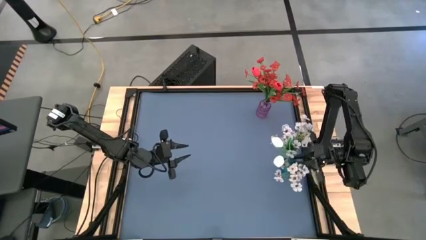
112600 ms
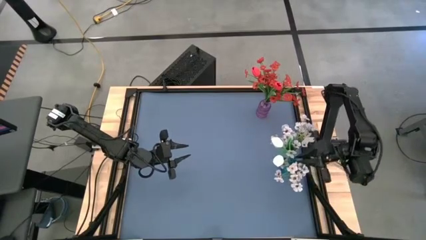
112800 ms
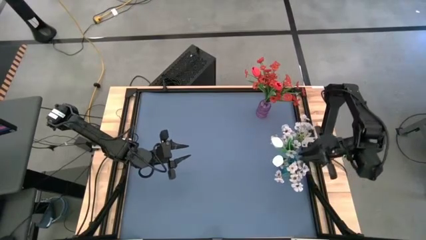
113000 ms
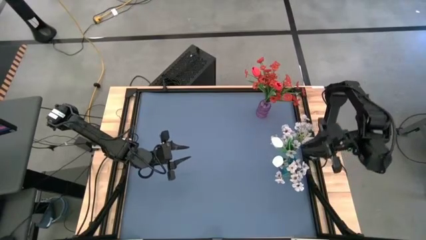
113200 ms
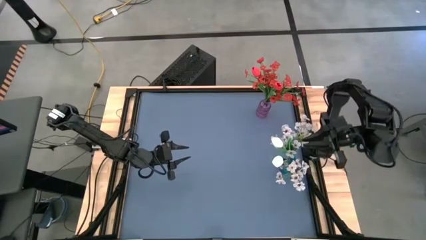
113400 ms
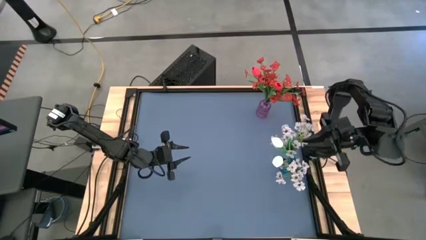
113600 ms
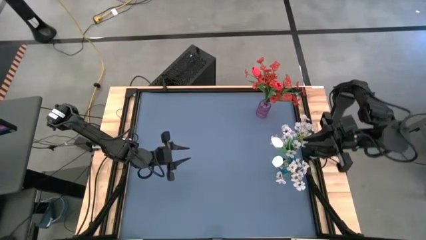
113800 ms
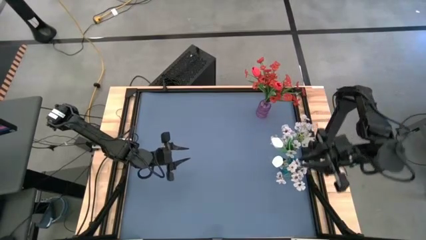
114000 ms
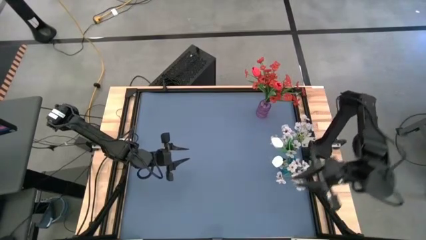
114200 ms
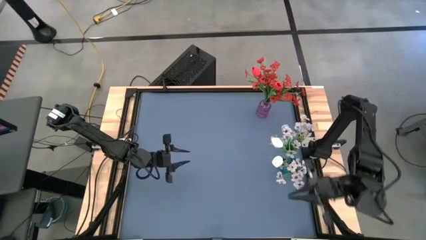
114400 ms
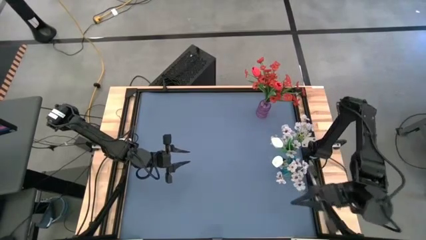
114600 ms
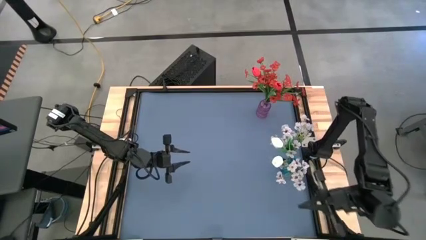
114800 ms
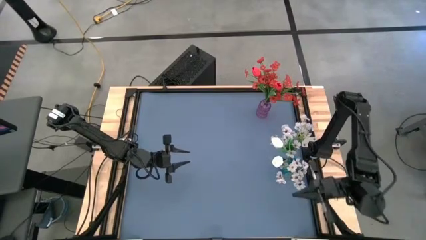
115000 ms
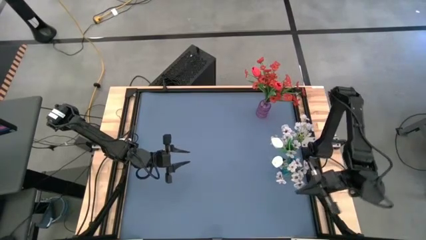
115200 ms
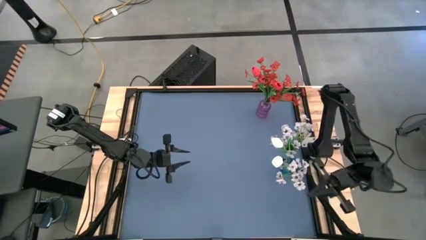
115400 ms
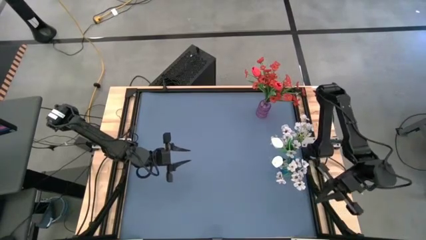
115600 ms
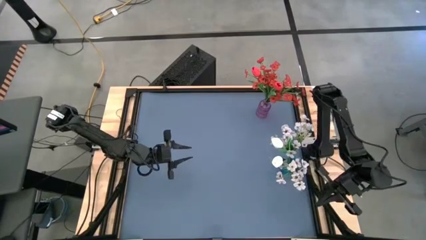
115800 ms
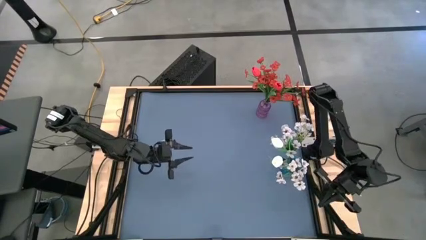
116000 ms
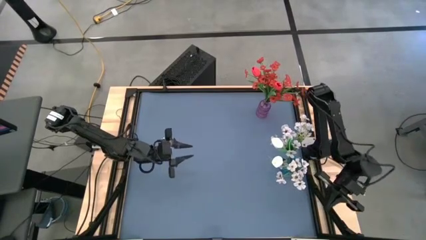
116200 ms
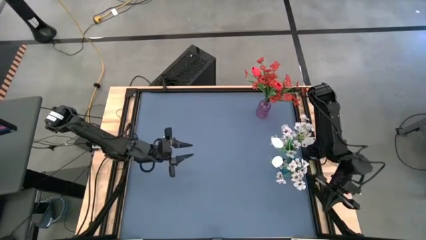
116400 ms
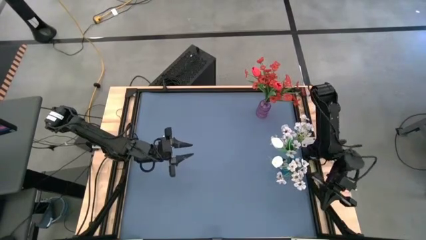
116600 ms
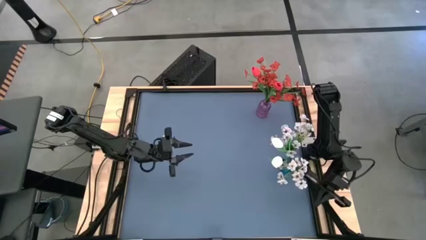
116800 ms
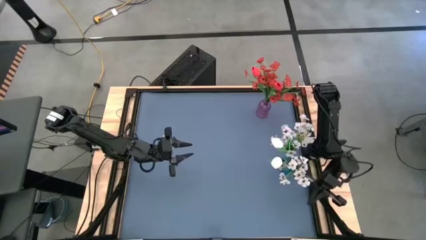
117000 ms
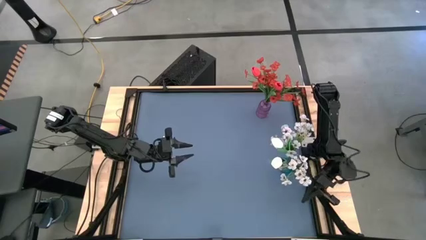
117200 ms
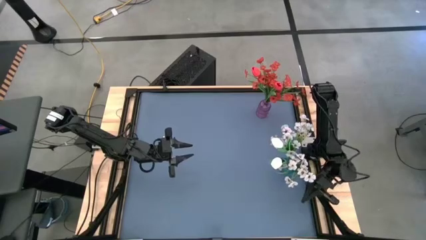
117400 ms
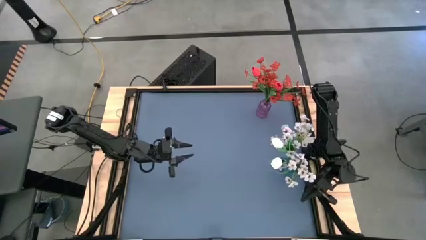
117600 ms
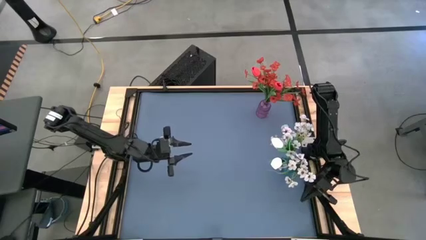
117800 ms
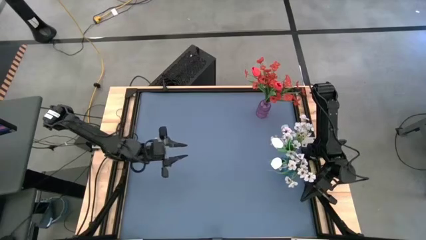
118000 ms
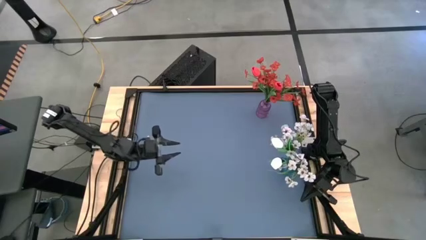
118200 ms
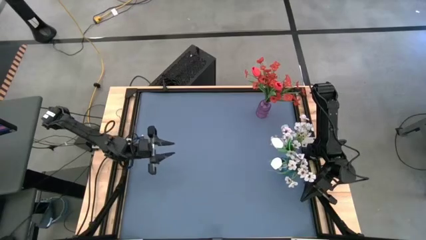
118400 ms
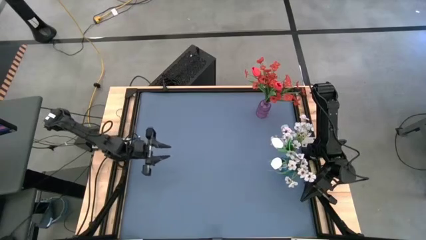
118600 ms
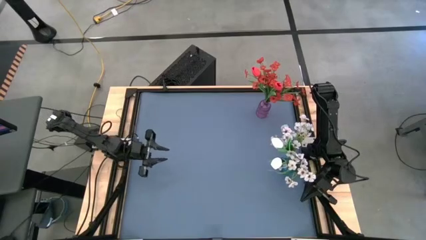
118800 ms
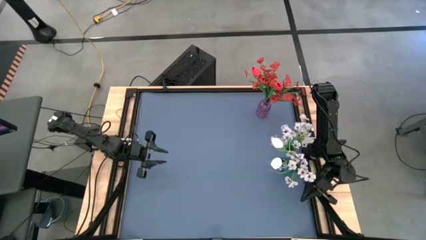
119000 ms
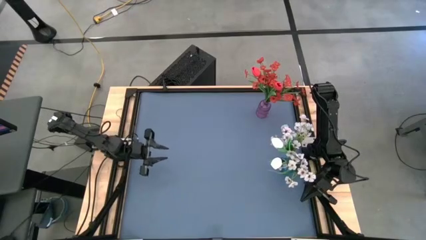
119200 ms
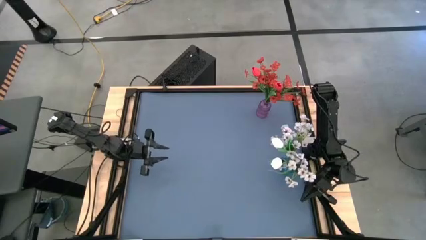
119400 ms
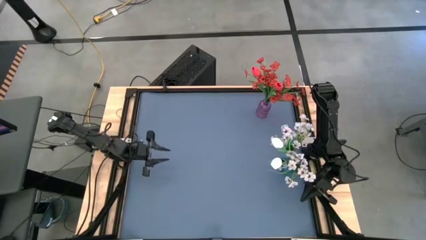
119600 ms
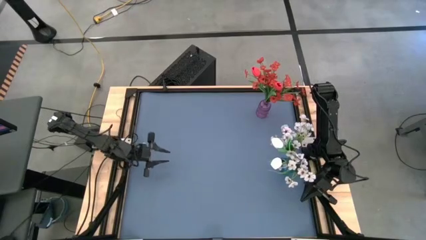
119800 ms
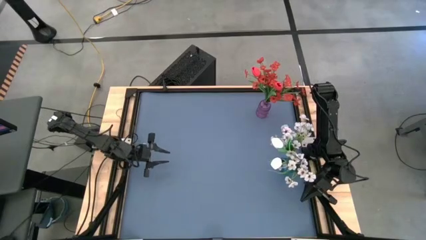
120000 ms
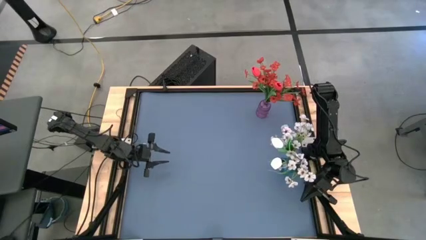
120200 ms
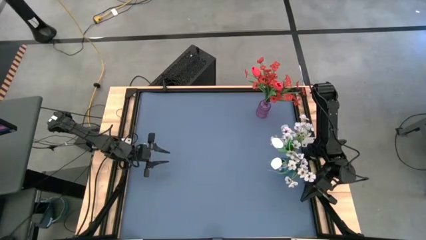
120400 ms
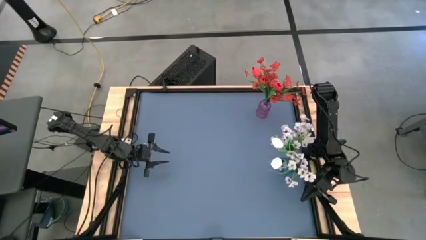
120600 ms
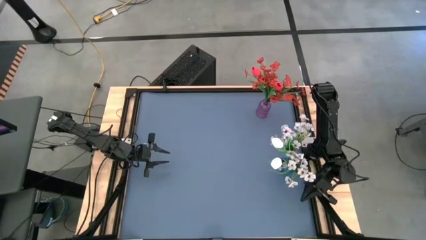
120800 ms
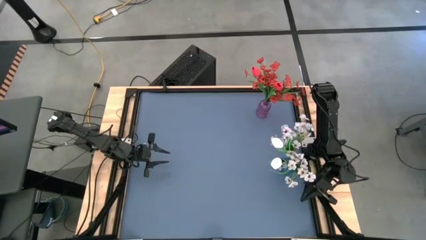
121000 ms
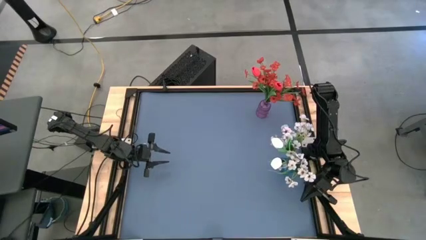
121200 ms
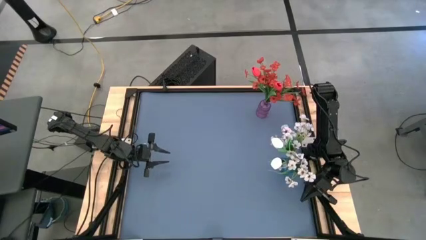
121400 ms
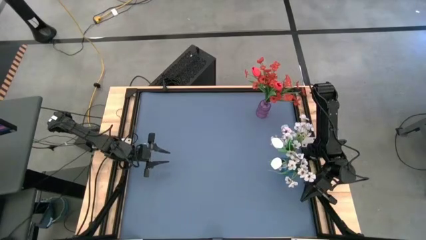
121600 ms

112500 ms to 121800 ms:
Task: Sort flowers into vase by color
Return to Home Position

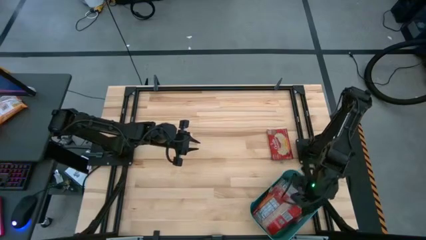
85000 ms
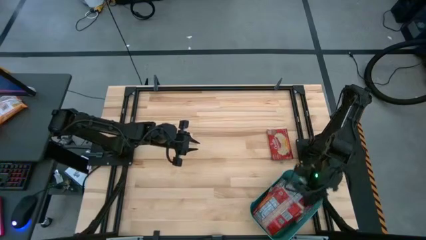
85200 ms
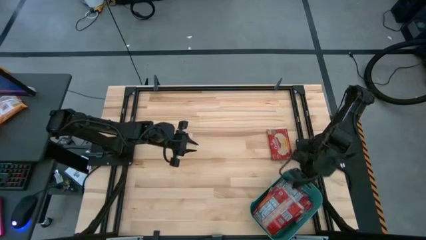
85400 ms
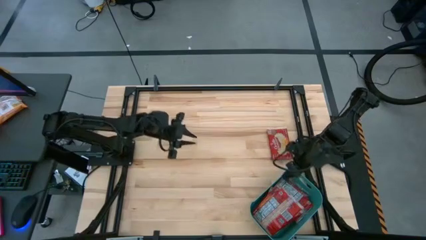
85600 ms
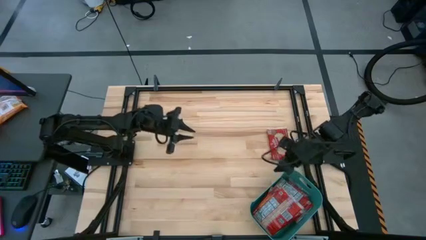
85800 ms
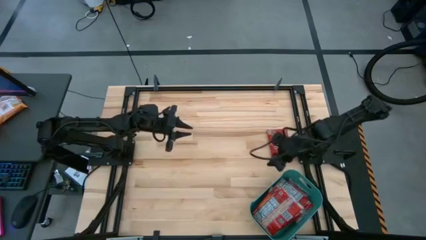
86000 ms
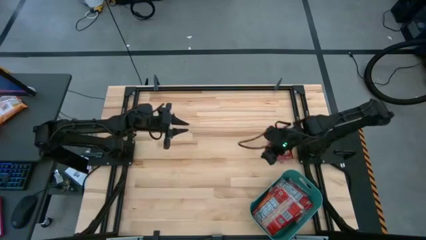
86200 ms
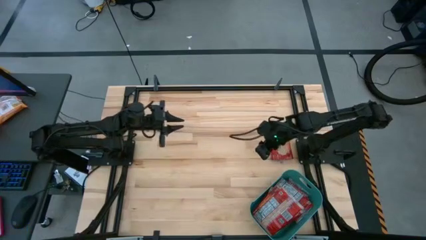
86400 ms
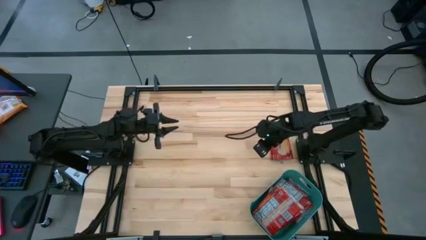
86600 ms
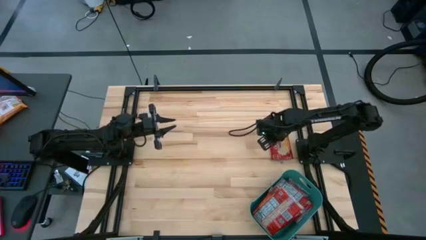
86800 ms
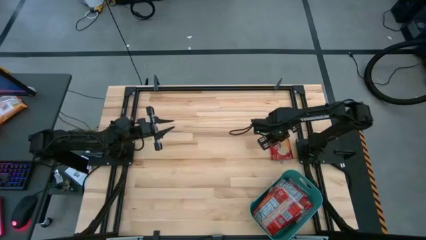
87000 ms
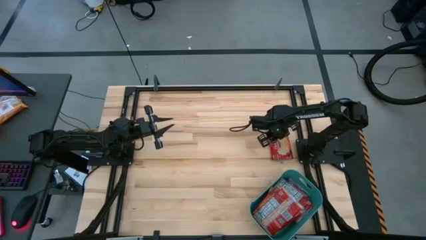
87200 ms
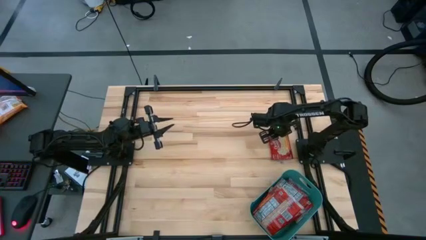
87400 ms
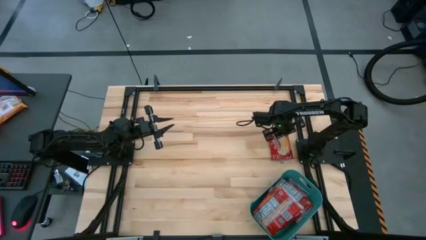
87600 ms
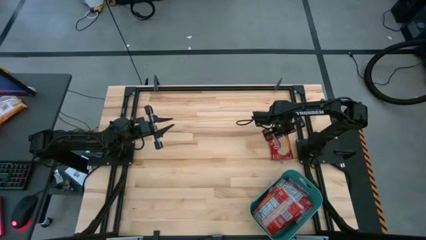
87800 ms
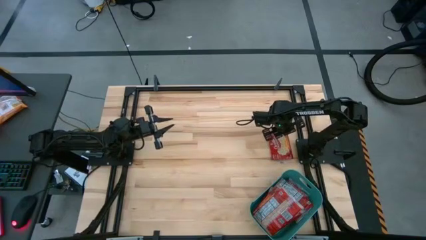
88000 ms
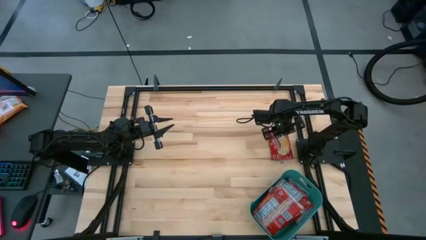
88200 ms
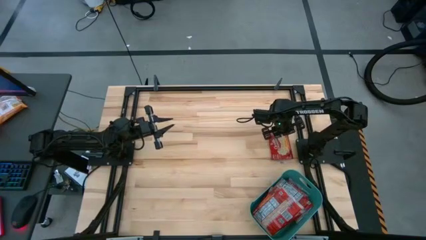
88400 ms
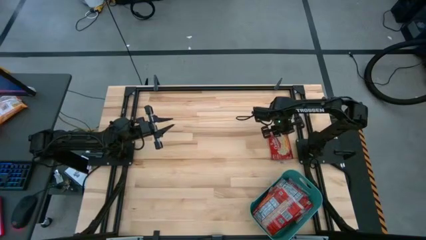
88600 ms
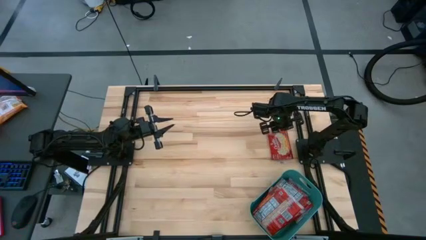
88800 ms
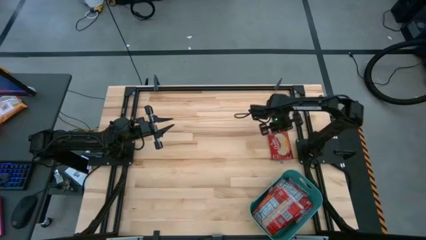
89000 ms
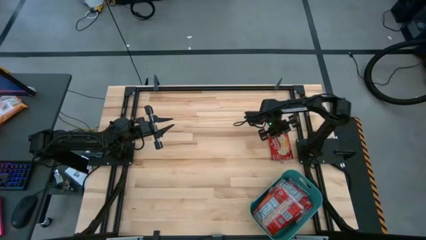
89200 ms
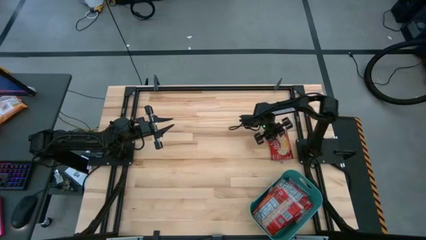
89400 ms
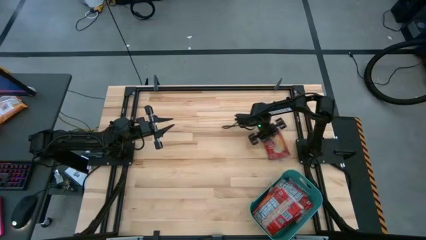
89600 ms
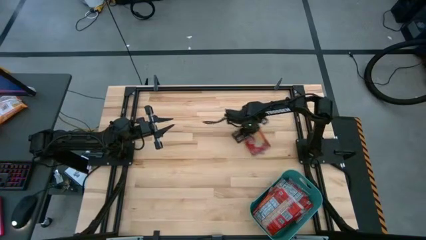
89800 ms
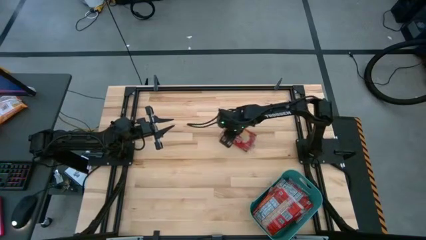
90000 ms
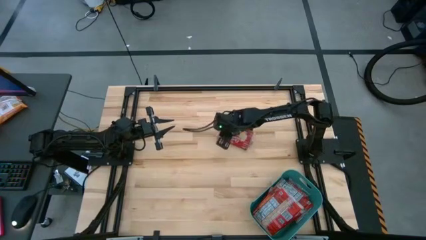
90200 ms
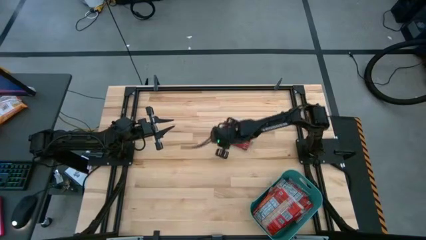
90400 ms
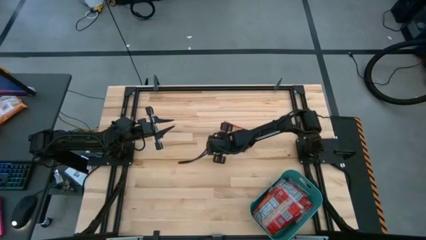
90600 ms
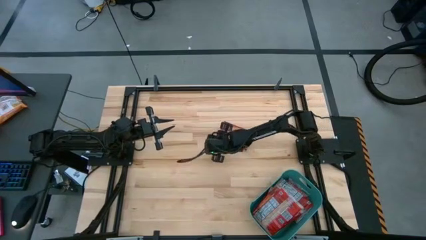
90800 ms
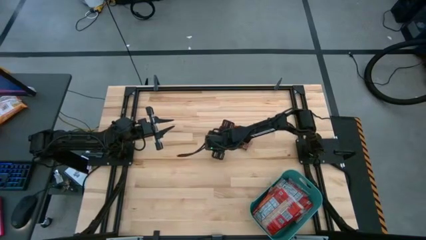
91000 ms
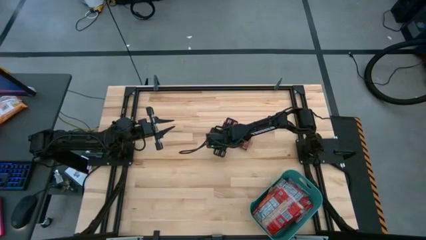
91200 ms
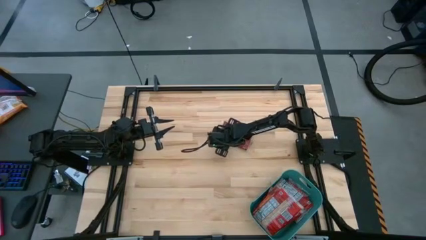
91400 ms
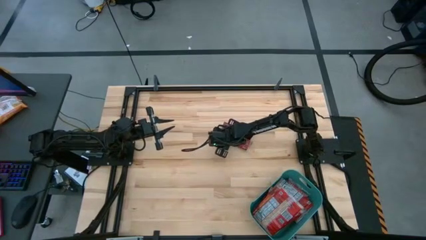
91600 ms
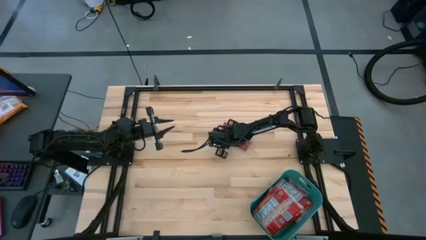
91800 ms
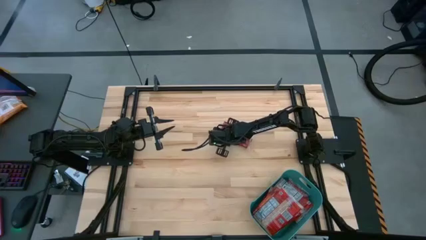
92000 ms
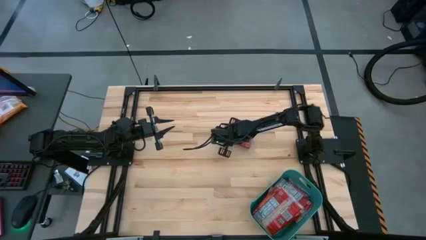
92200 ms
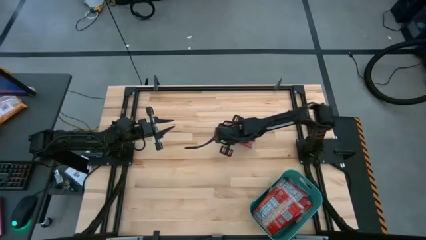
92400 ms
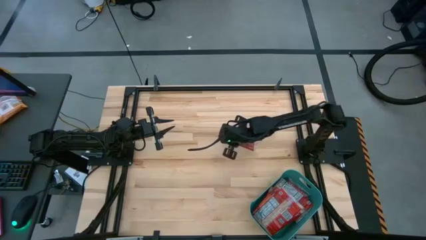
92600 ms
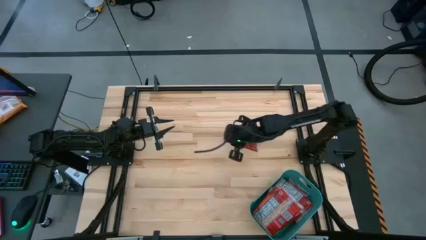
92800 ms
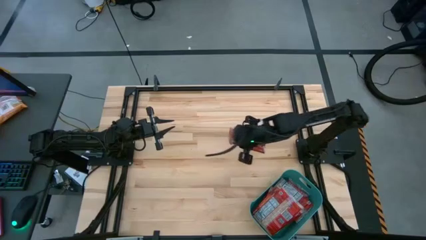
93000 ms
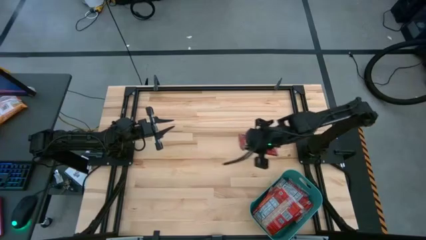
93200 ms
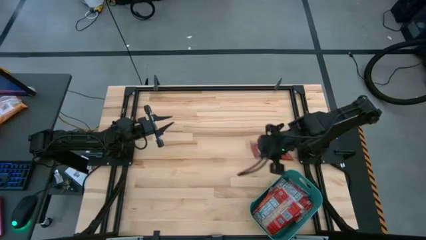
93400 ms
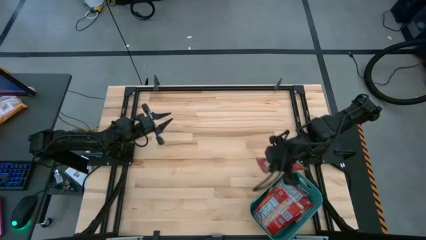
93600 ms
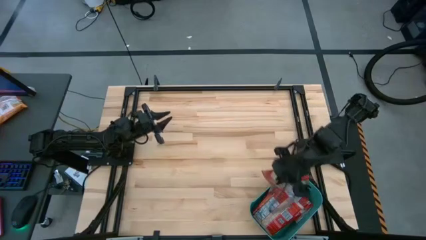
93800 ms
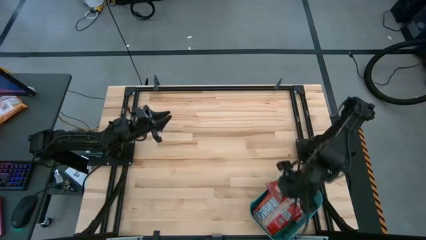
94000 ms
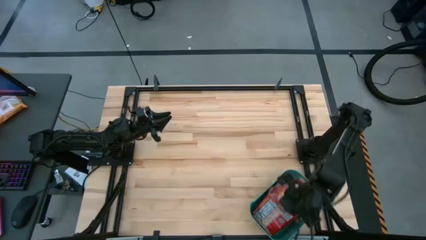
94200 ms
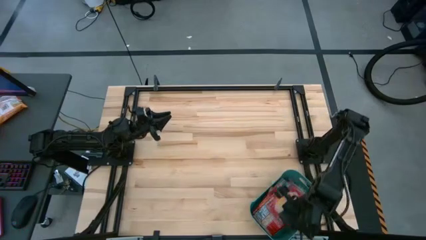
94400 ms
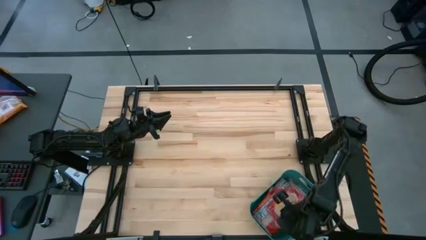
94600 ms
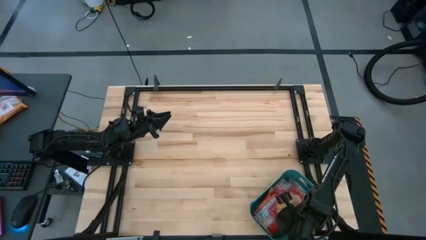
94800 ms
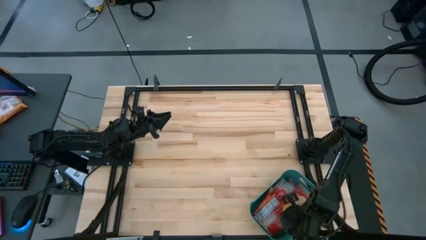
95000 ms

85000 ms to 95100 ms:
Task: Sort popcorn bags into baskets
Put the red popcorn into the green bin
